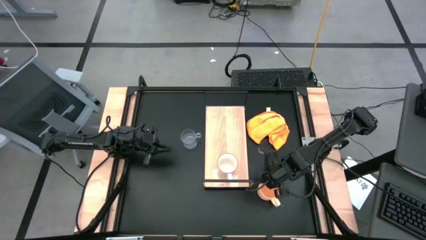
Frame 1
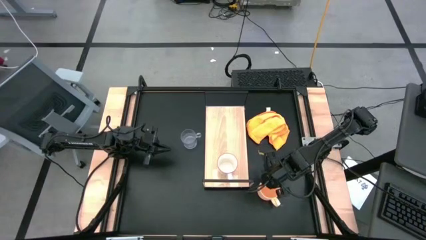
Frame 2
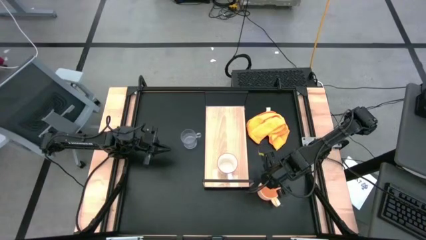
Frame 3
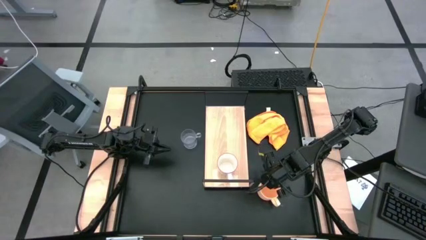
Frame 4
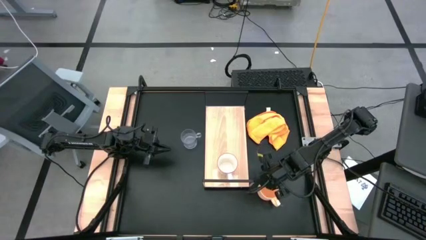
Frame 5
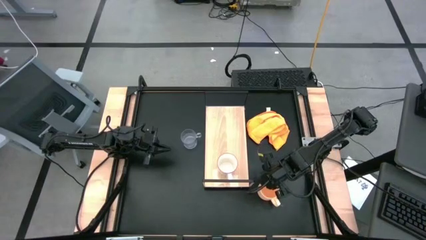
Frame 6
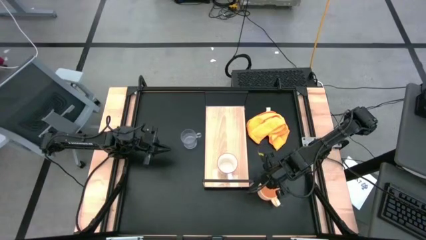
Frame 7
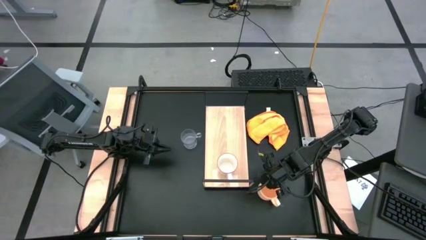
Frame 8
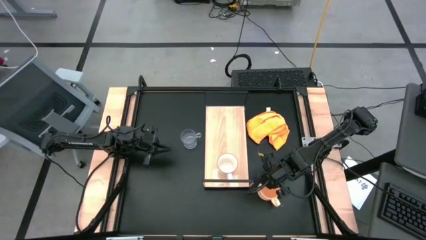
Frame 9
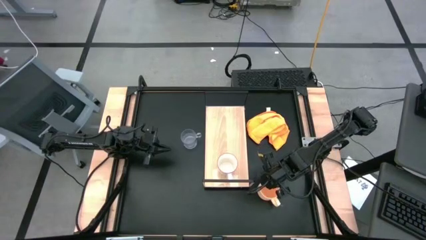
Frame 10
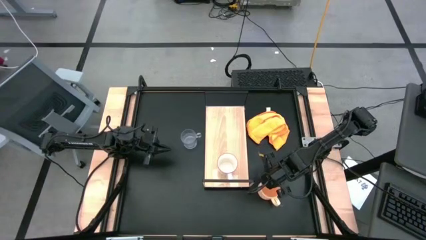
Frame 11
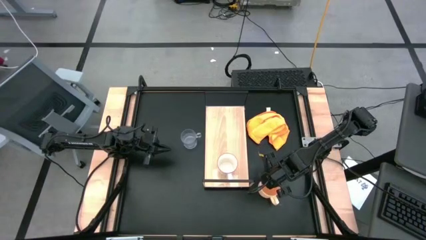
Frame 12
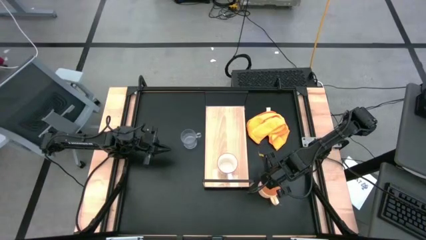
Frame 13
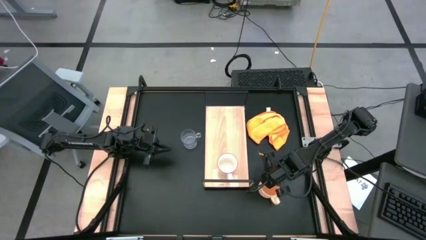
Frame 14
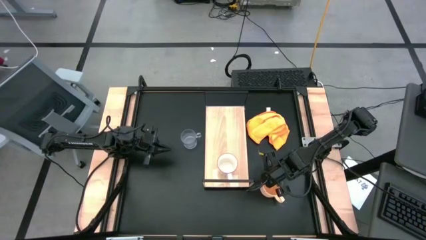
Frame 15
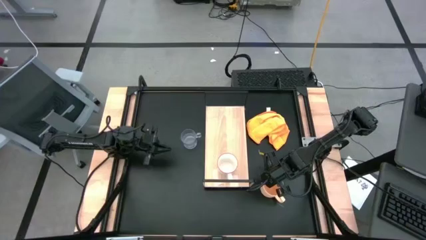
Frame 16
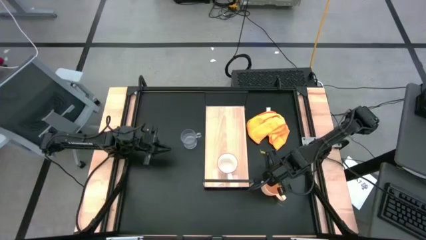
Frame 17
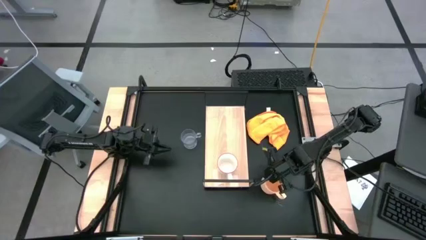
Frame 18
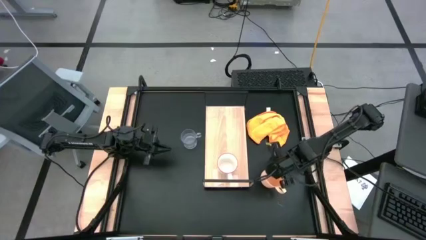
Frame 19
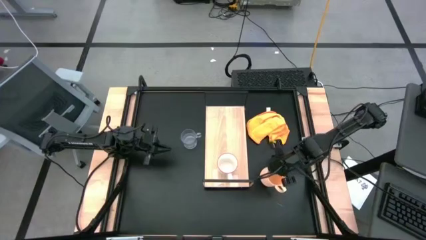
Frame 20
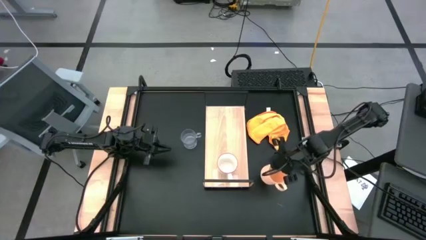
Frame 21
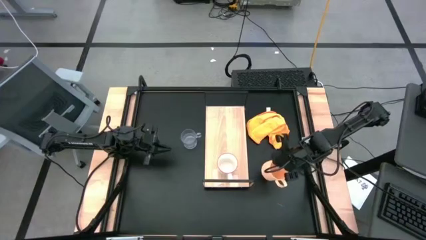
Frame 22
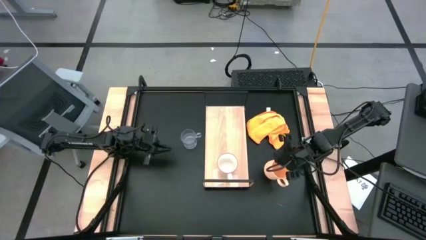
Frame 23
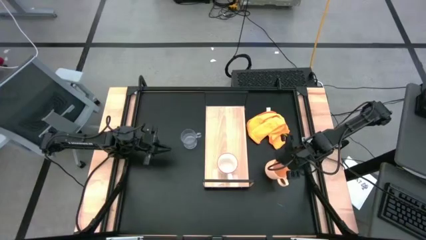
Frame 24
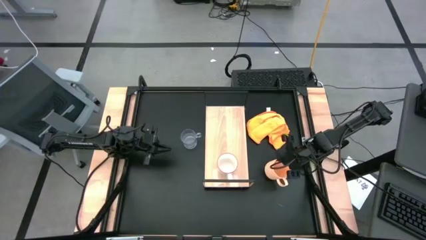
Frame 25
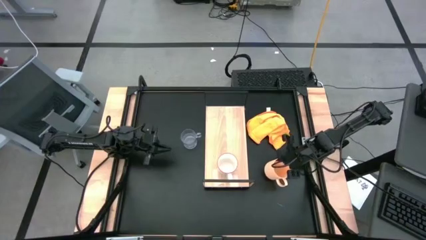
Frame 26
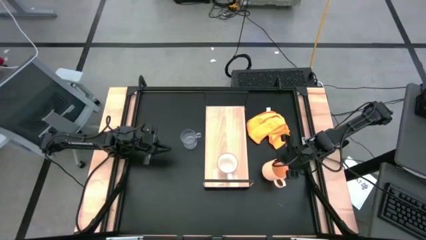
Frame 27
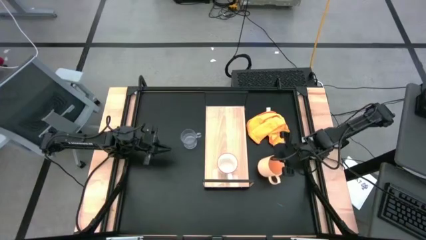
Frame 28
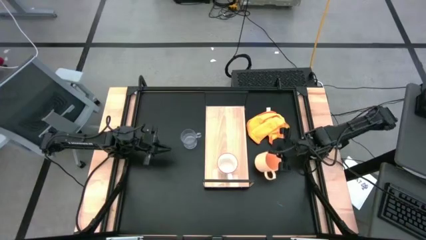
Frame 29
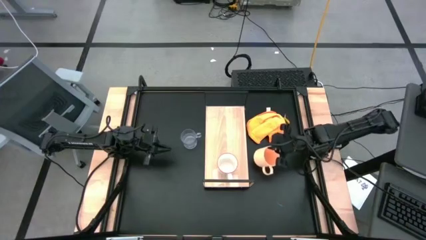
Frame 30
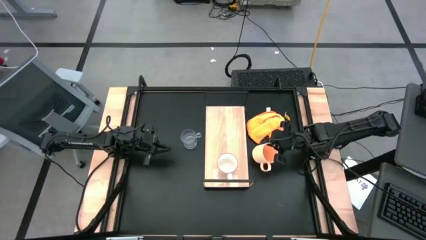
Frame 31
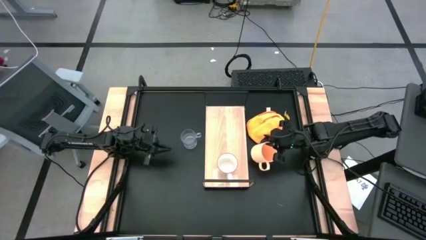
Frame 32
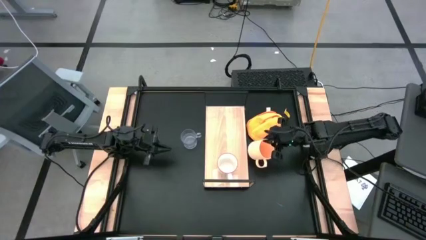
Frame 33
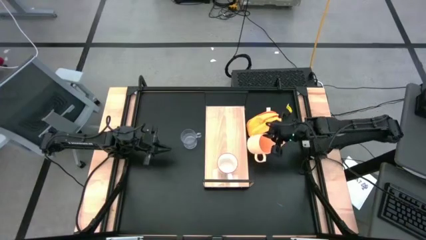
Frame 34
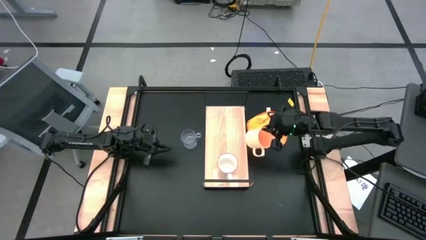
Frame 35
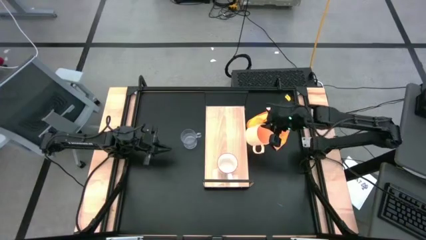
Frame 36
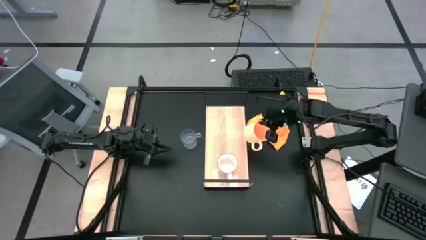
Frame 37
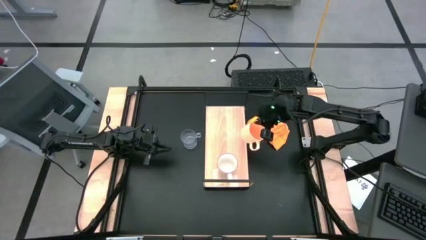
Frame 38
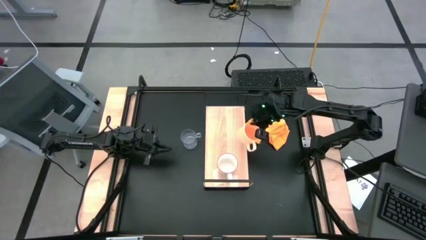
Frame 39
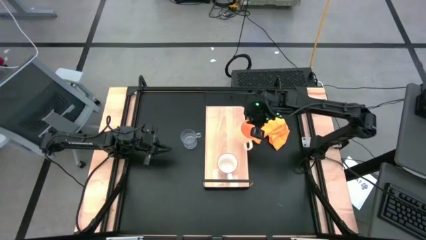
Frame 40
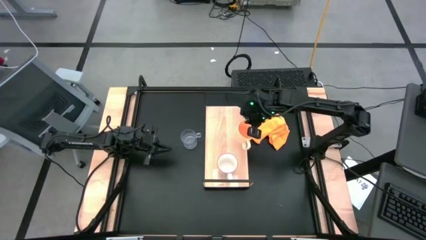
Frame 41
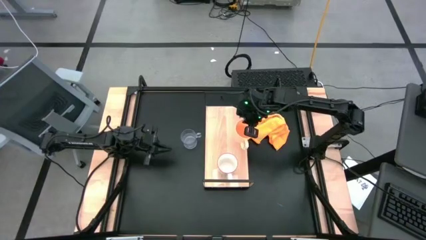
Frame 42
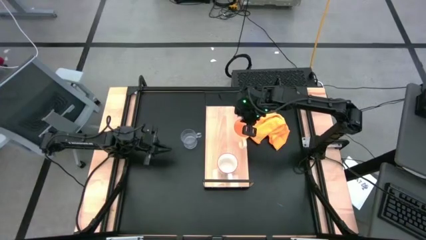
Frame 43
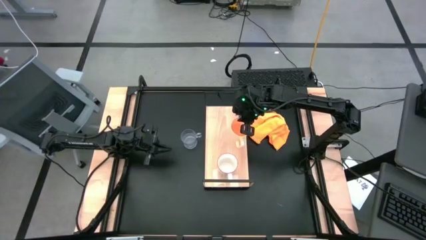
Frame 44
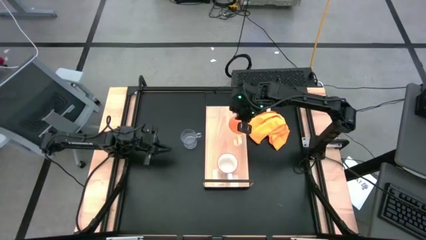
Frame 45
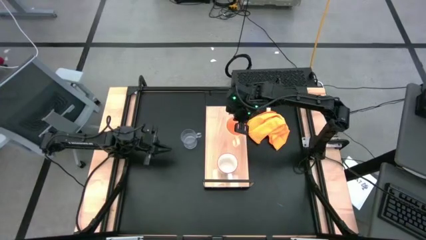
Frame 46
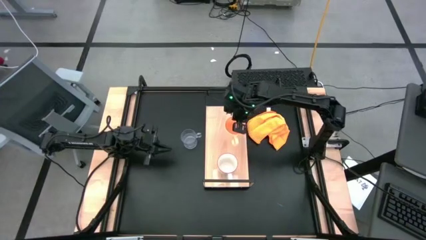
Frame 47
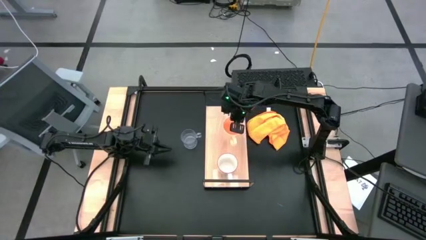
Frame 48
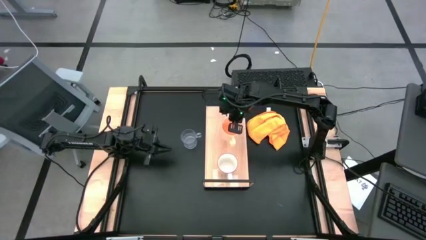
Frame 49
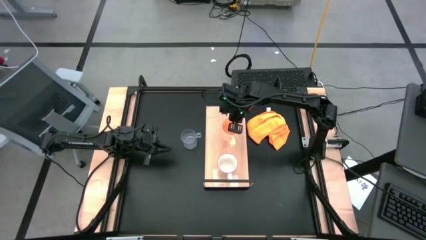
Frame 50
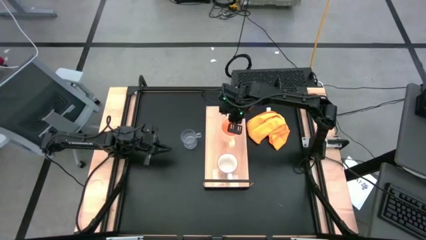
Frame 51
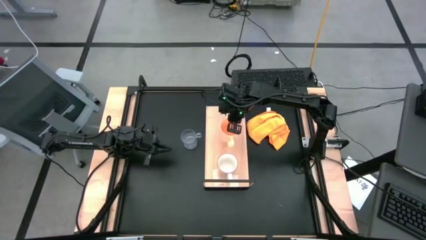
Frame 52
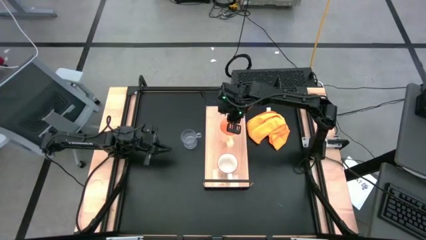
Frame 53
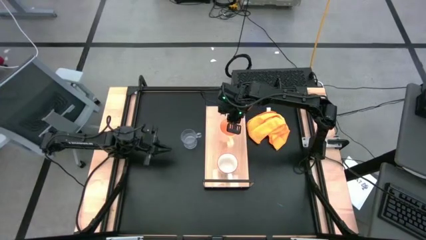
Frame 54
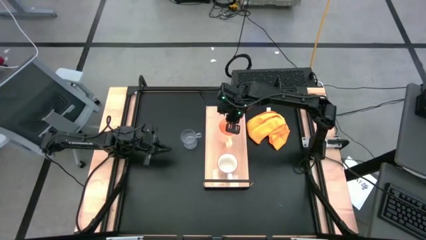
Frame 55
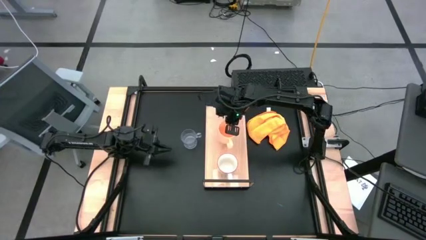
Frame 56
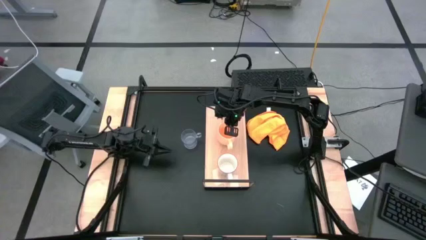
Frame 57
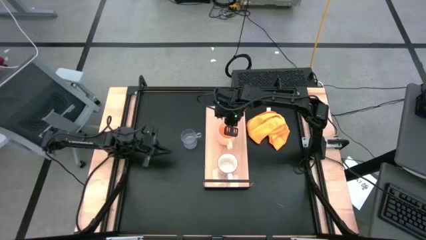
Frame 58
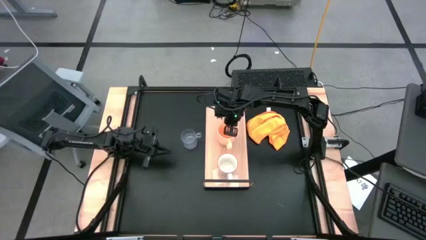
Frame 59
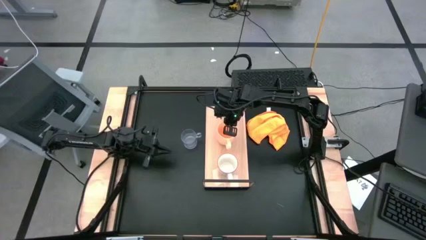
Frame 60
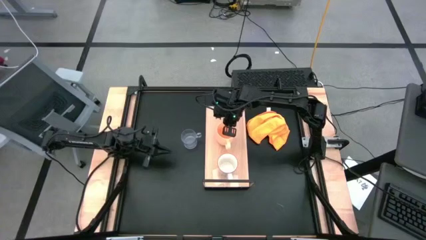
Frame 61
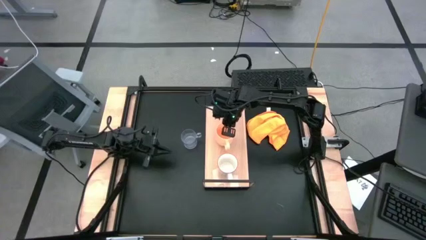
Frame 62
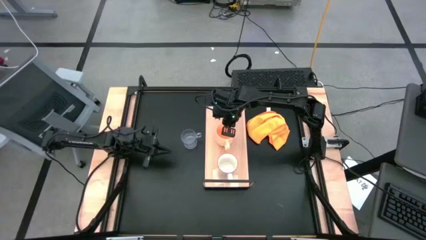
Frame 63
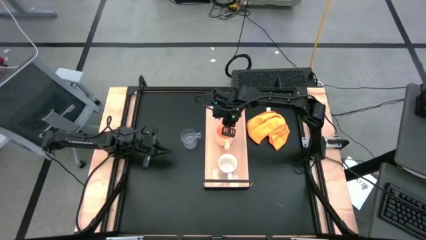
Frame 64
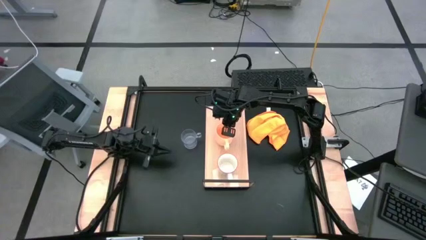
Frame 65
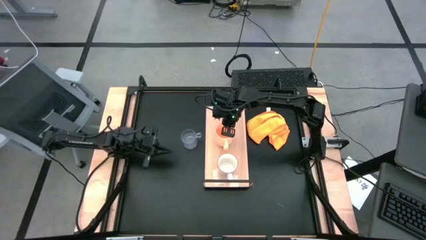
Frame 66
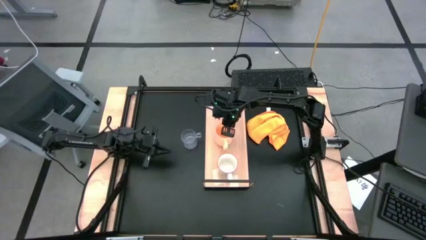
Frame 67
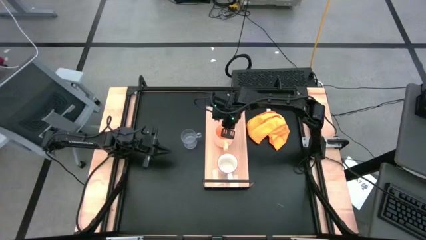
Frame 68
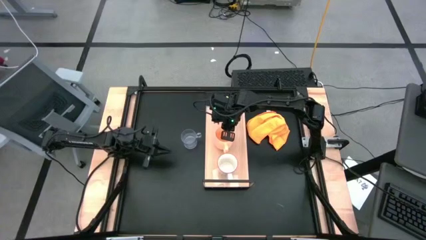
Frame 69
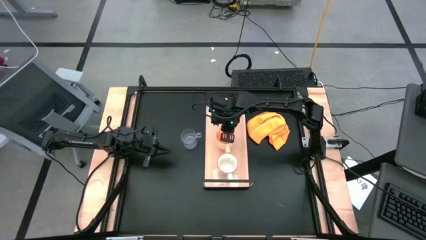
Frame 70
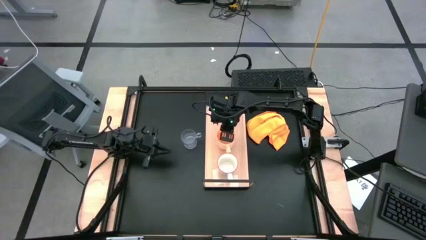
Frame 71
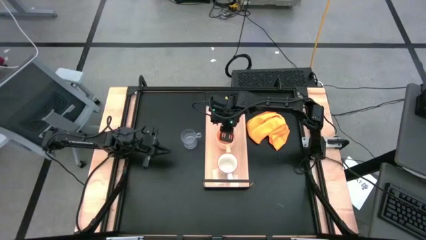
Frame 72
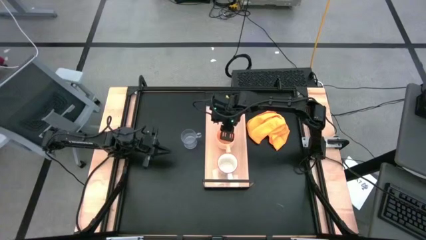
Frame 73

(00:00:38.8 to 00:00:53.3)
Task: Stack small to large cups/mugs on shelf
Put the orange cup on the shelf
